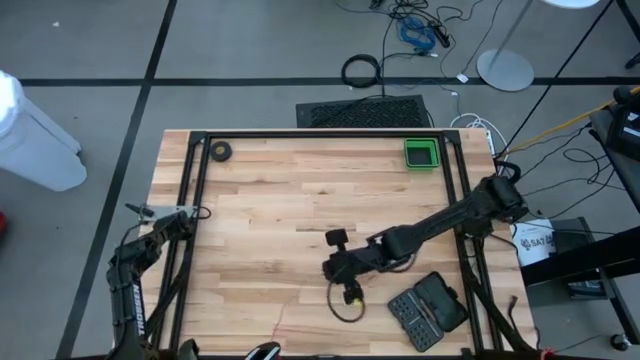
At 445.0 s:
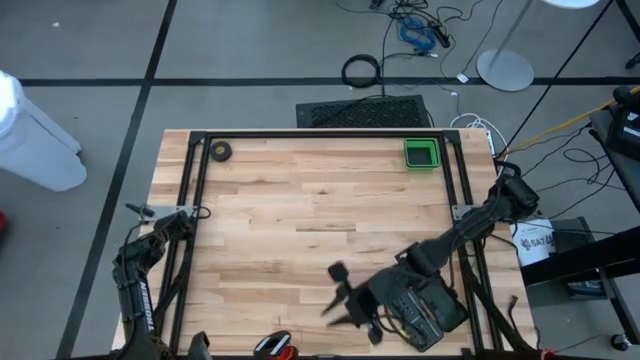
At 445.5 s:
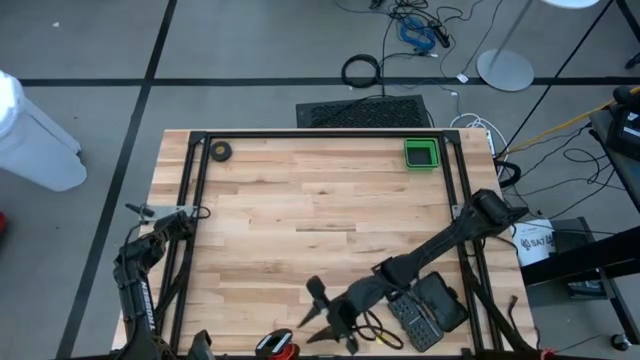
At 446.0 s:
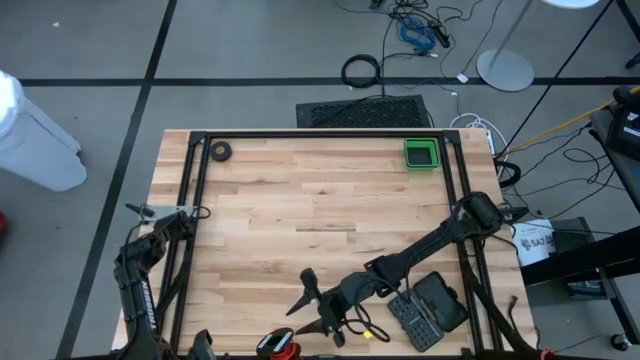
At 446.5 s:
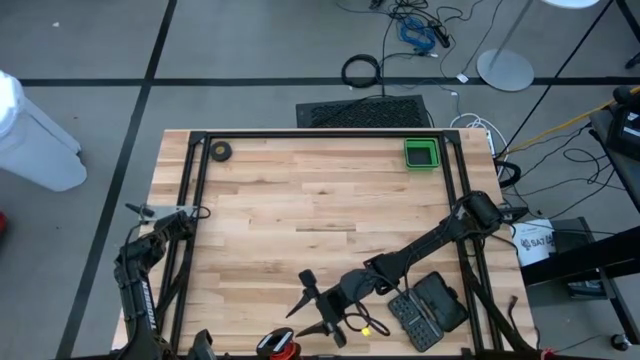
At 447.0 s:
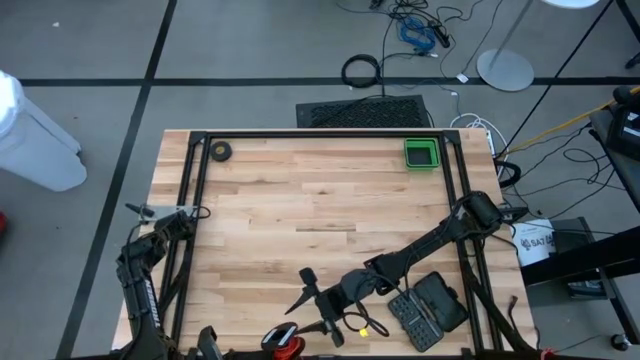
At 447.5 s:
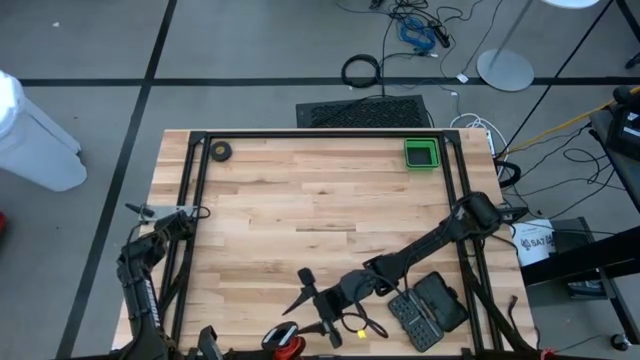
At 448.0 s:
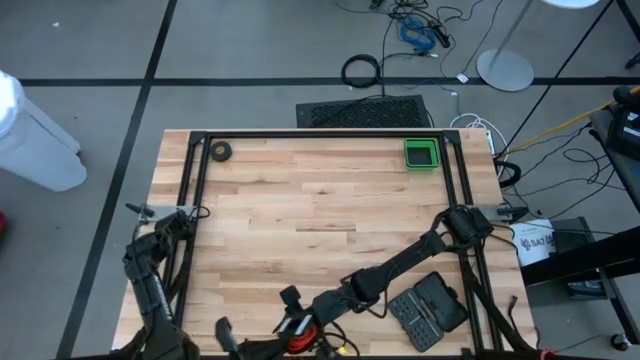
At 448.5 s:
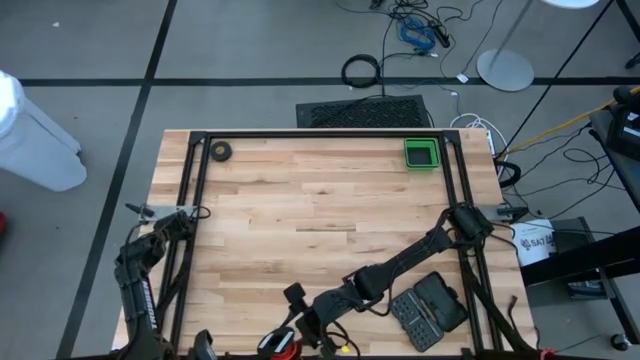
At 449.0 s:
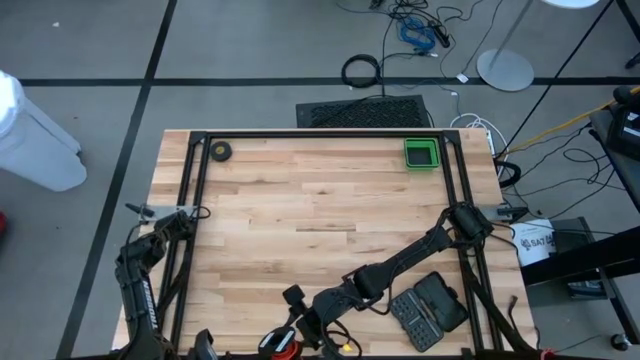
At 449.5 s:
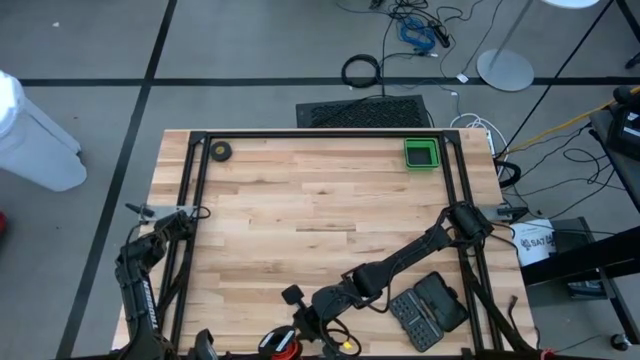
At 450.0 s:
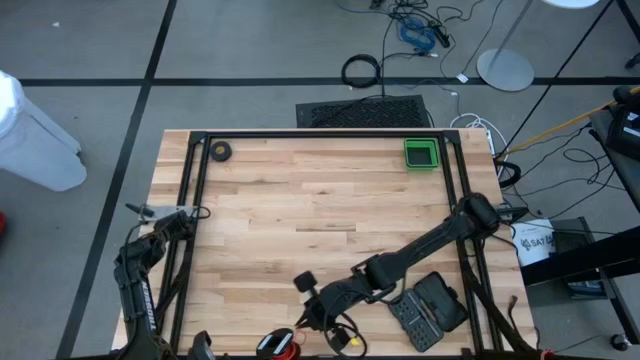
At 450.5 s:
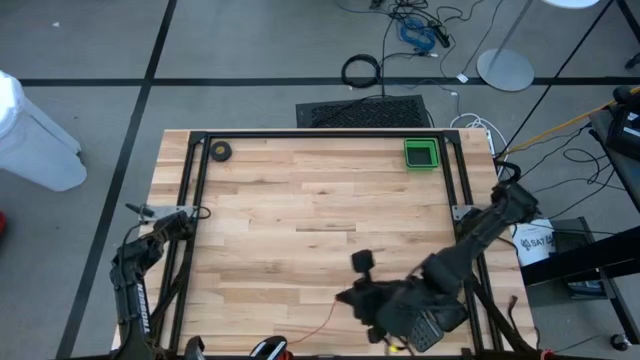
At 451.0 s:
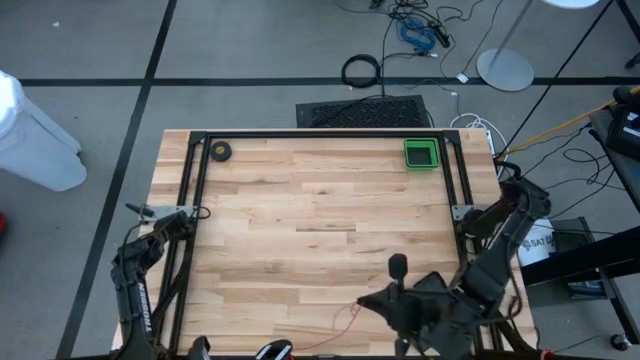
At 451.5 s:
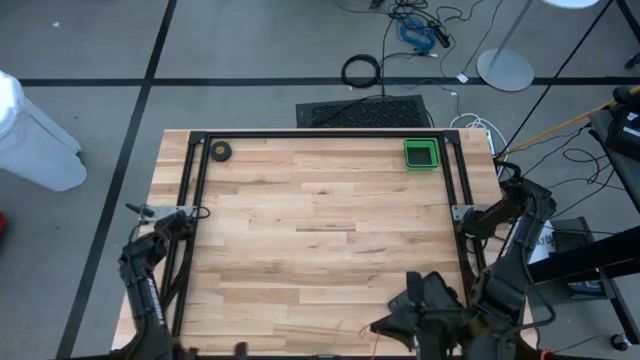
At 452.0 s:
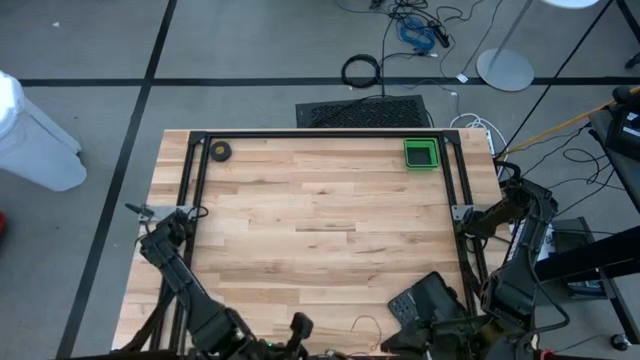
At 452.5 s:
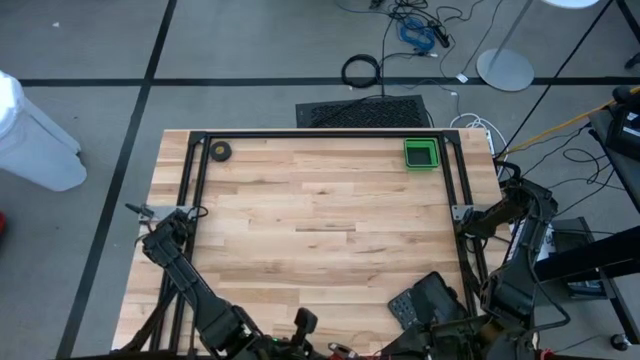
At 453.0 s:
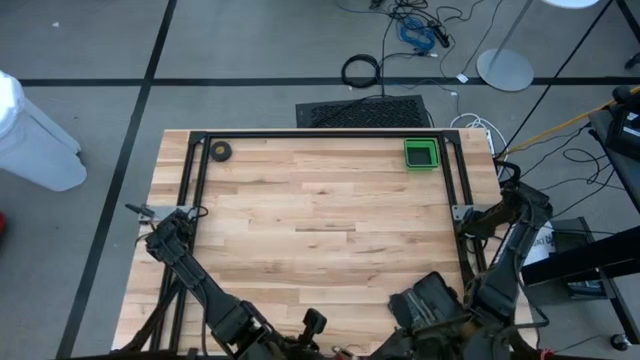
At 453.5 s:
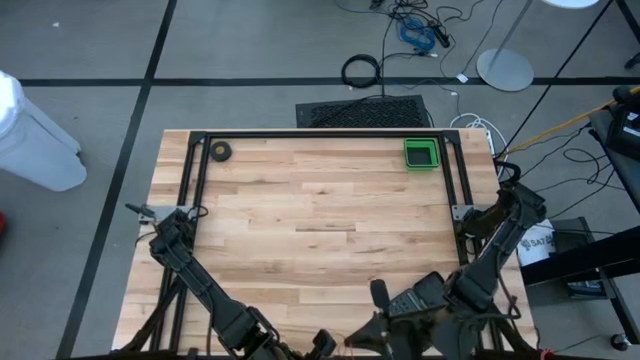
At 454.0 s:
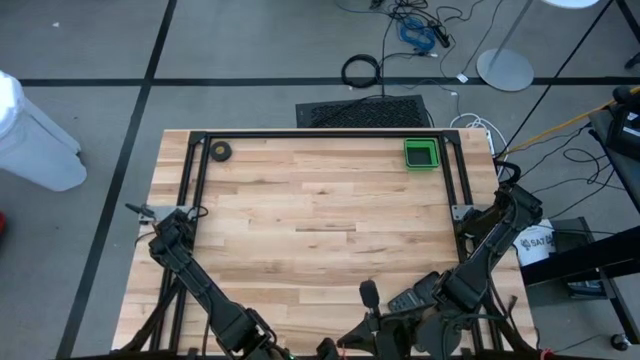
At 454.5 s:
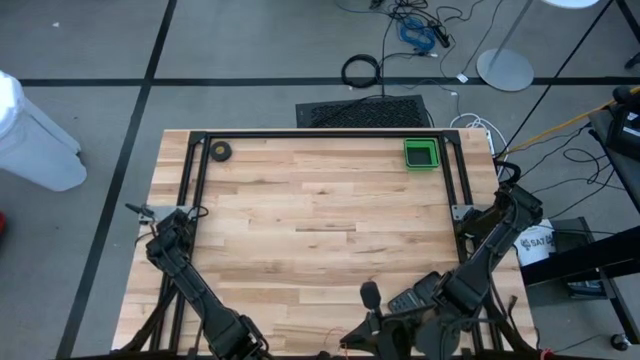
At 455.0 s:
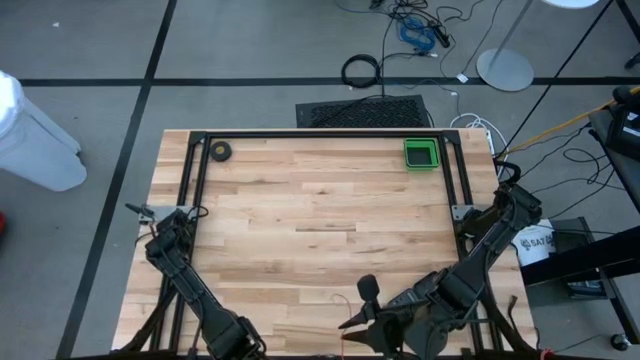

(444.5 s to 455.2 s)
Task: Coil cords
Coil the red wire into the spool

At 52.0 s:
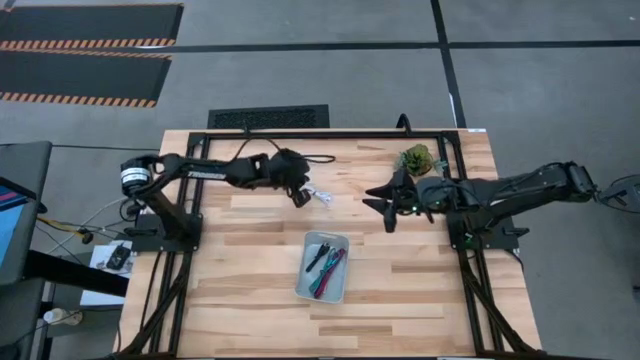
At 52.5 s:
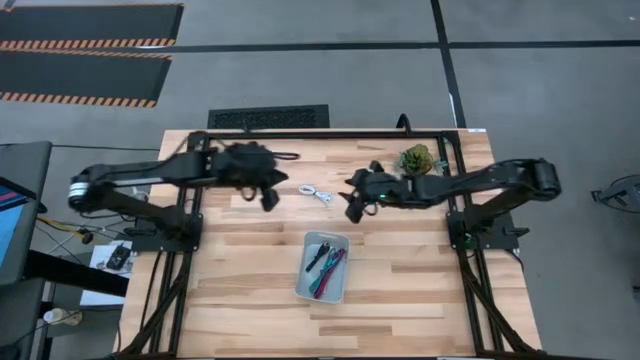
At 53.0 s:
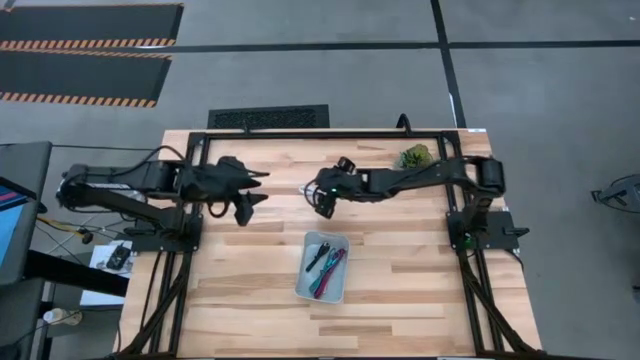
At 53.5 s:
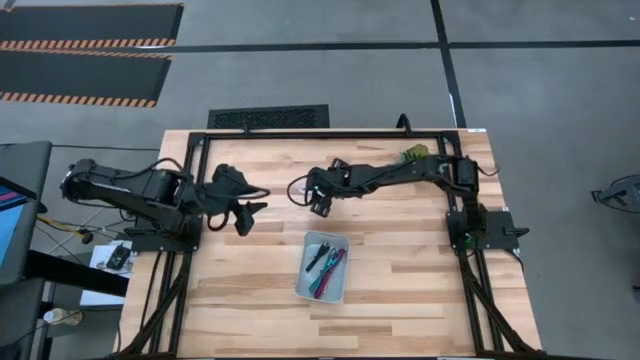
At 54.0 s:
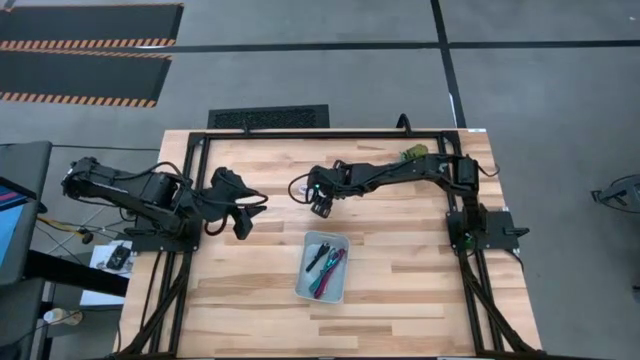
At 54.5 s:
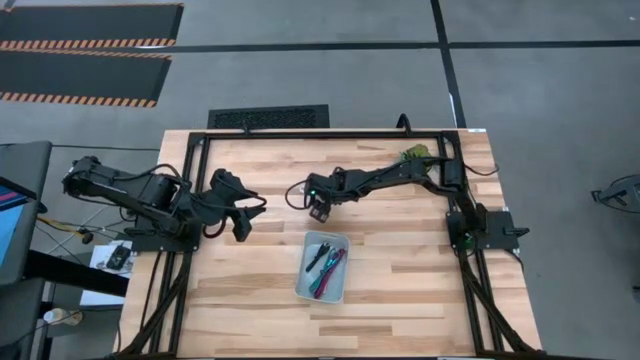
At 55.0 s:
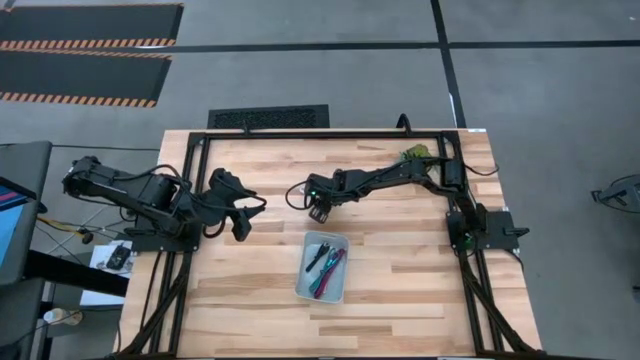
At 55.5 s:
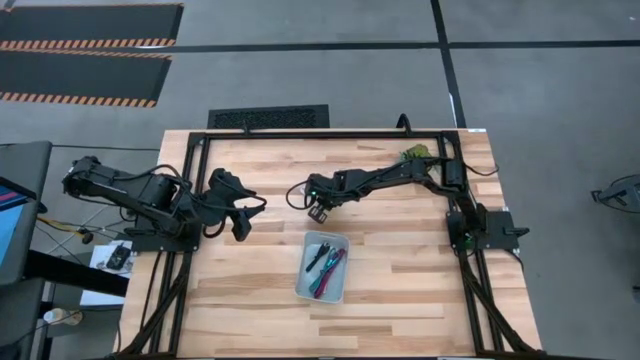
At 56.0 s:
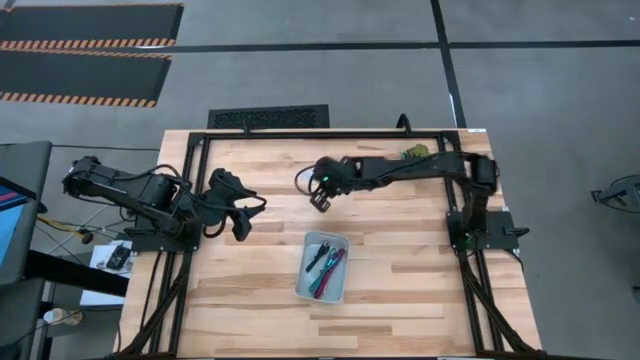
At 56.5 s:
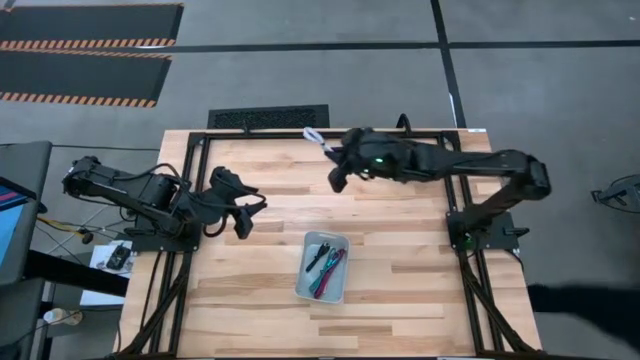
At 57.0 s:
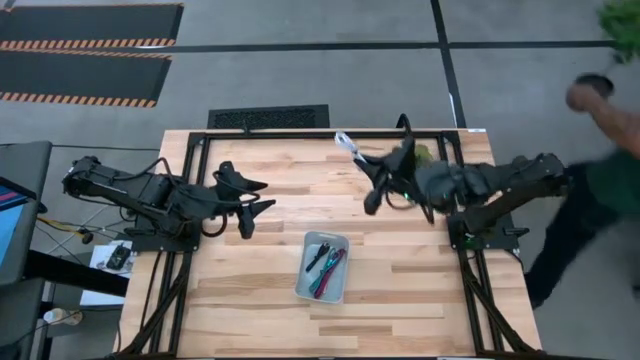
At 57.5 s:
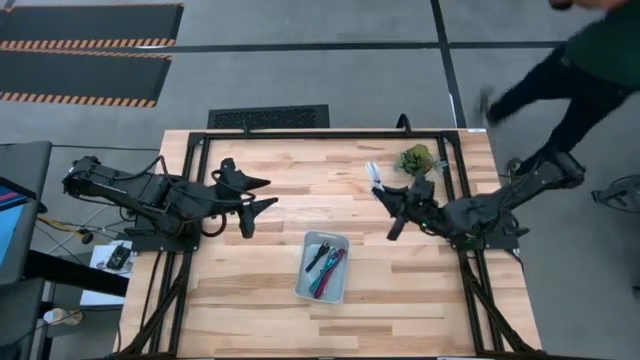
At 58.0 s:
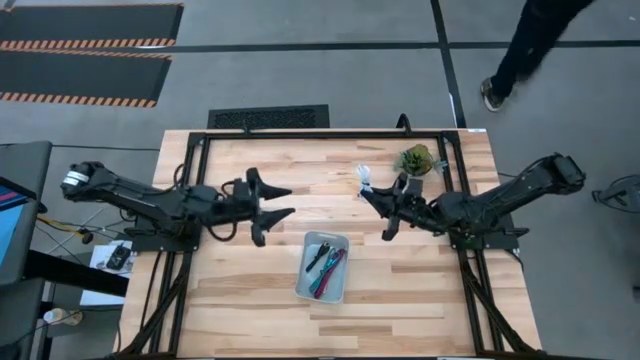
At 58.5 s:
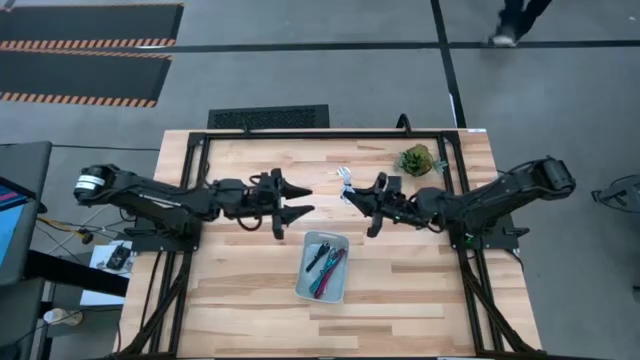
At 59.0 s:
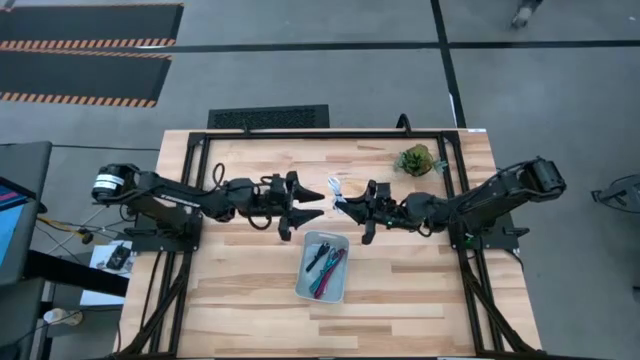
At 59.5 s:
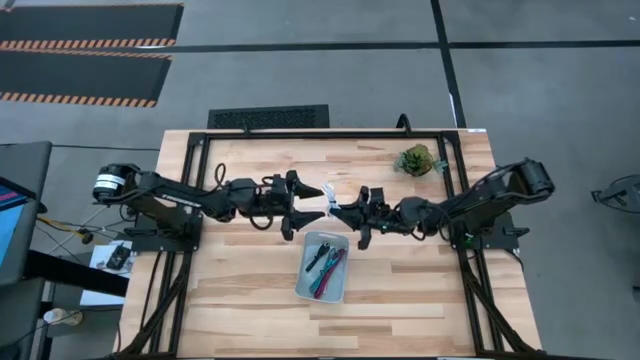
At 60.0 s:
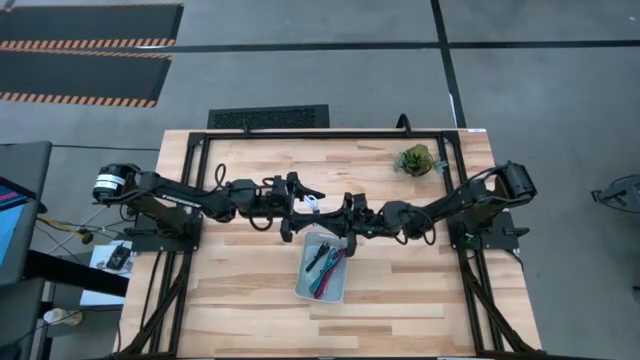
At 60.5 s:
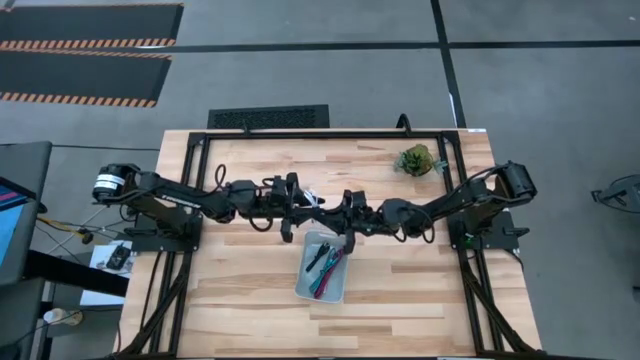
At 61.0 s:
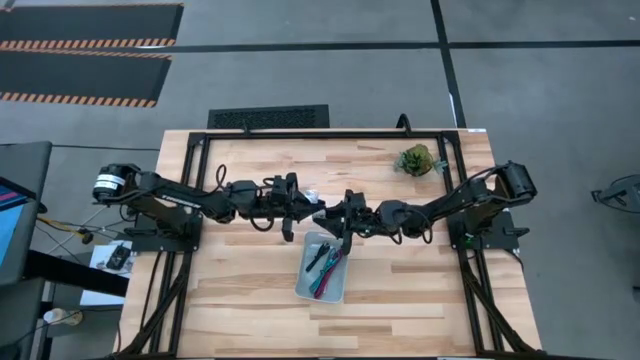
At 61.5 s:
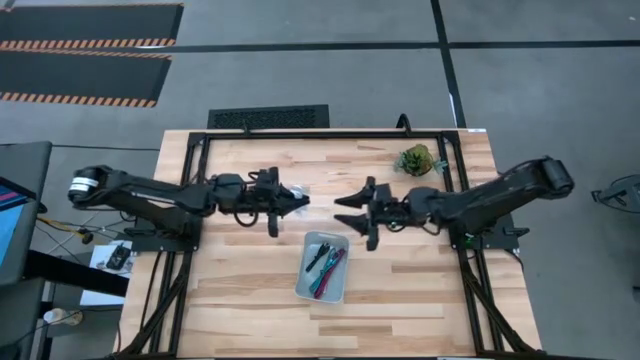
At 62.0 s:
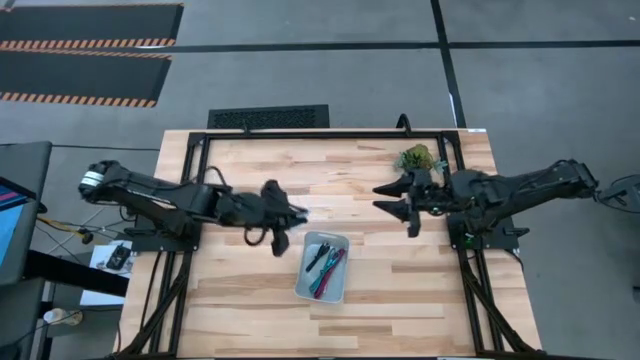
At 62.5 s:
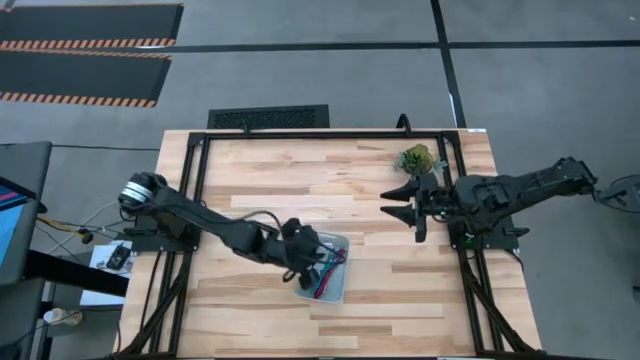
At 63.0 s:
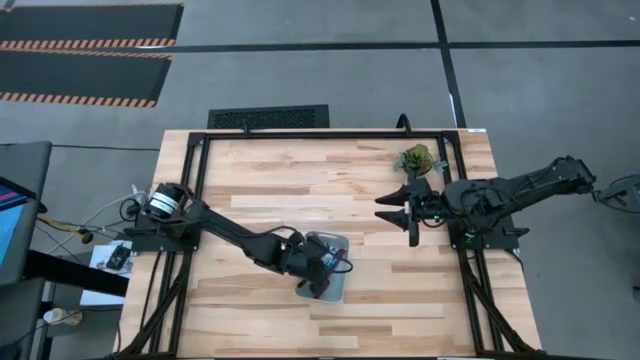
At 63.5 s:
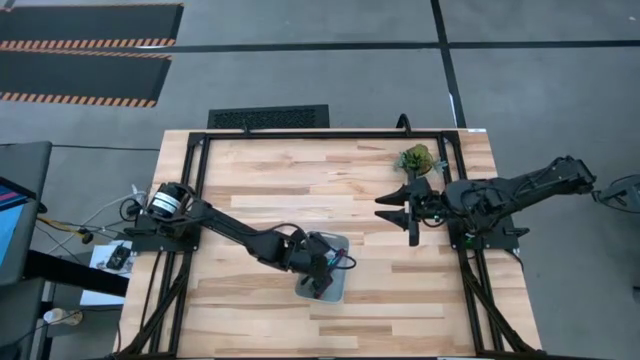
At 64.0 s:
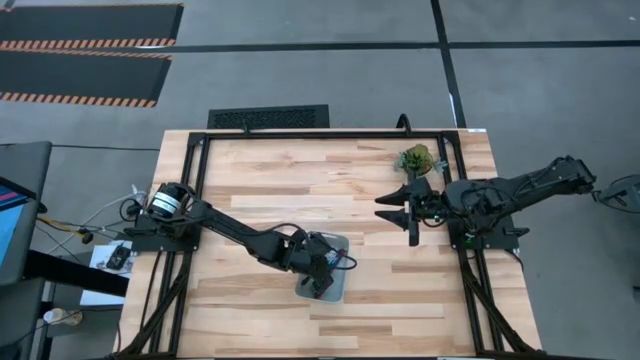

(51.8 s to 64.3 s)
Task: Pick and place USB-C Cables
Put the white charger cable into the gray bin
